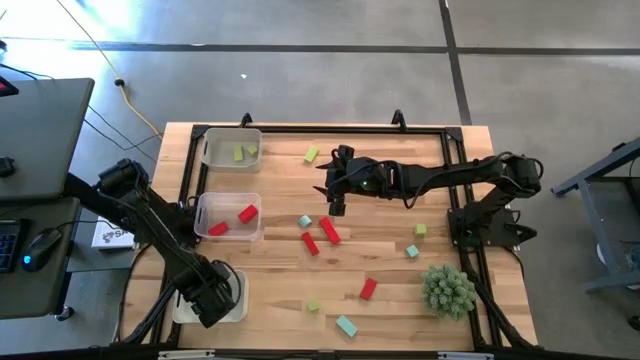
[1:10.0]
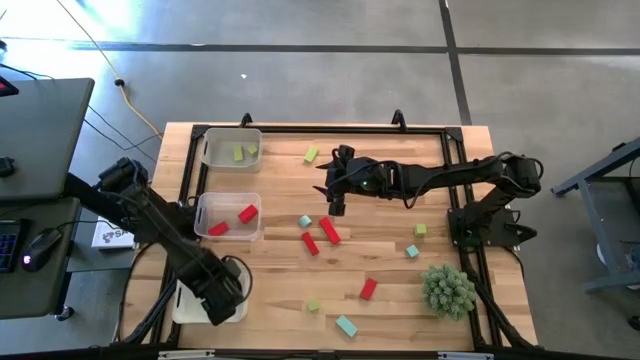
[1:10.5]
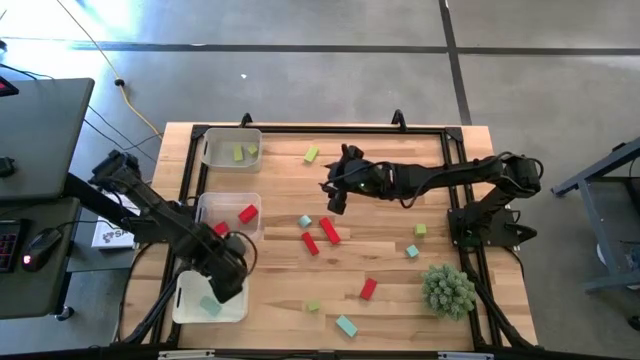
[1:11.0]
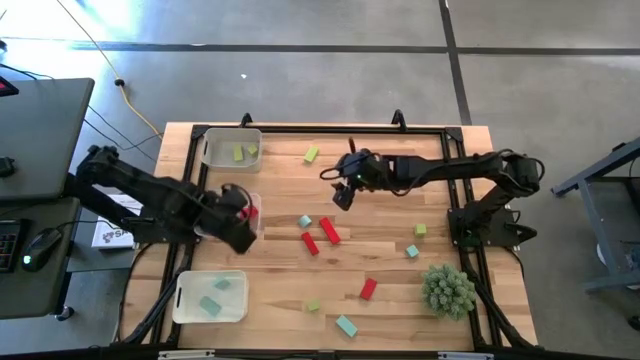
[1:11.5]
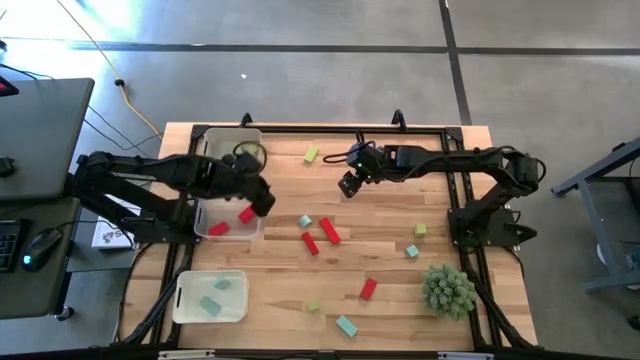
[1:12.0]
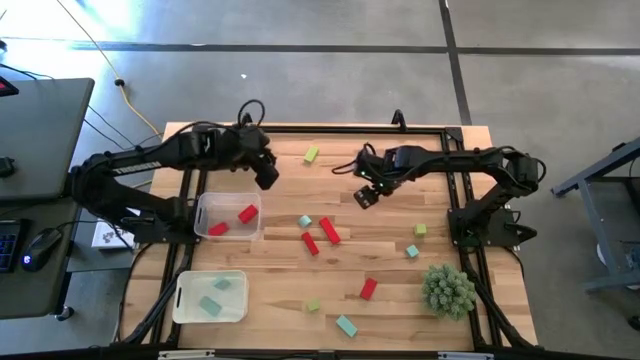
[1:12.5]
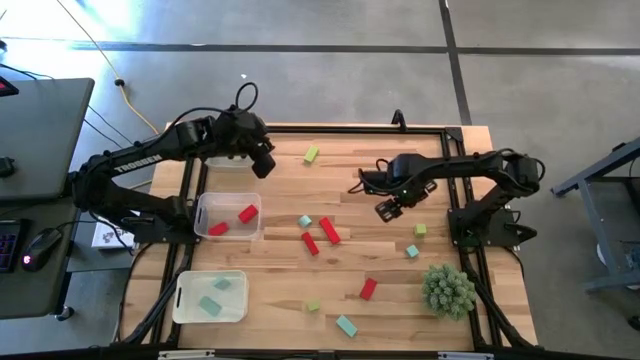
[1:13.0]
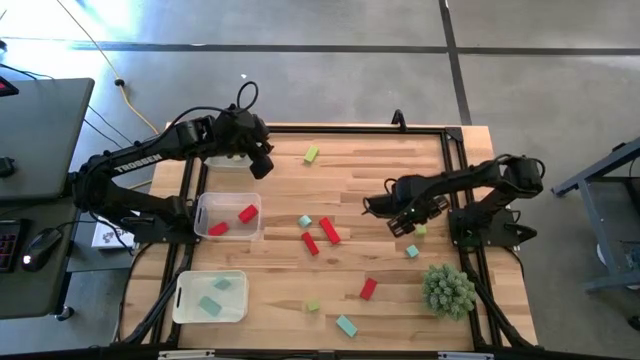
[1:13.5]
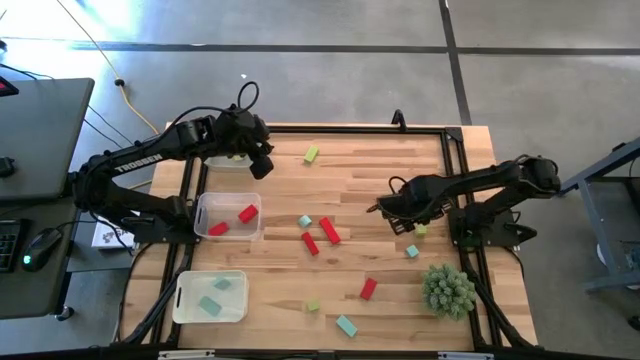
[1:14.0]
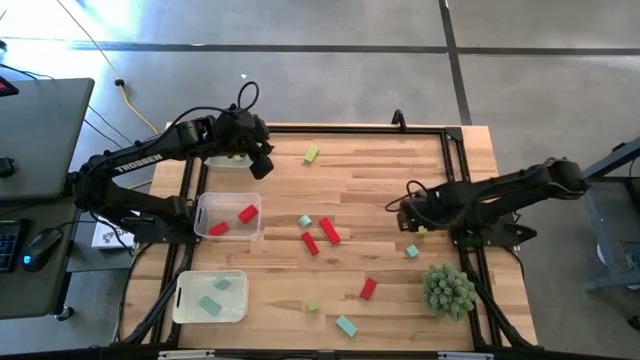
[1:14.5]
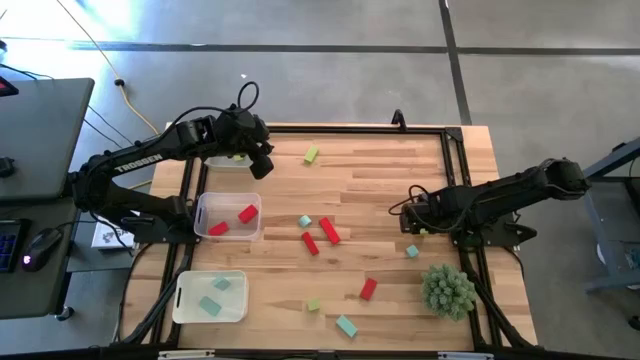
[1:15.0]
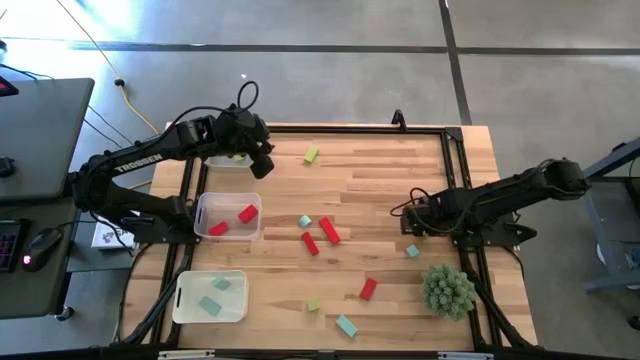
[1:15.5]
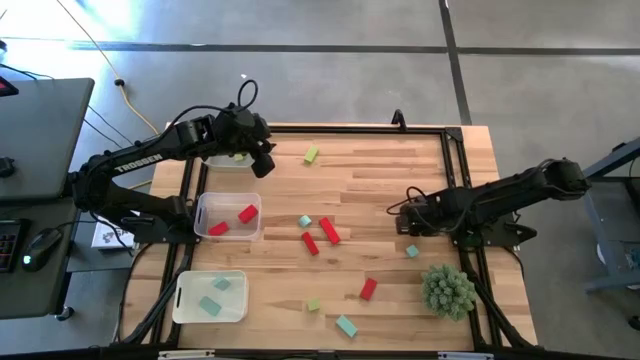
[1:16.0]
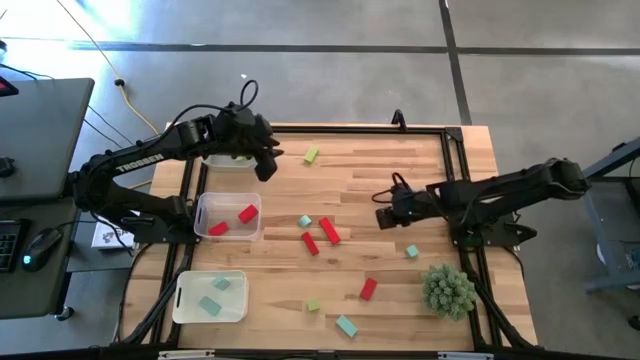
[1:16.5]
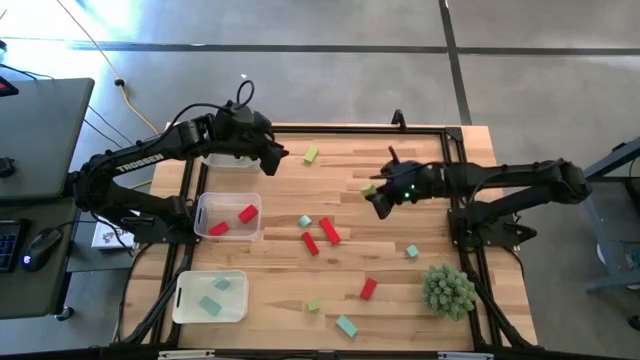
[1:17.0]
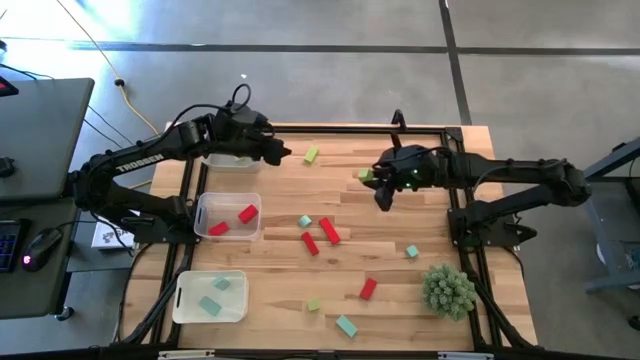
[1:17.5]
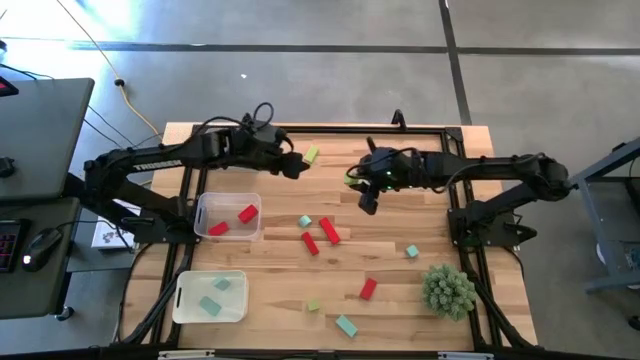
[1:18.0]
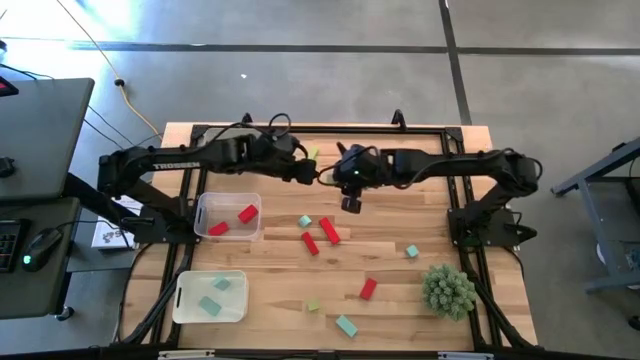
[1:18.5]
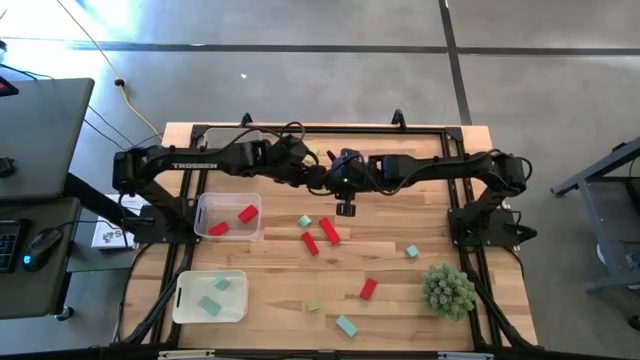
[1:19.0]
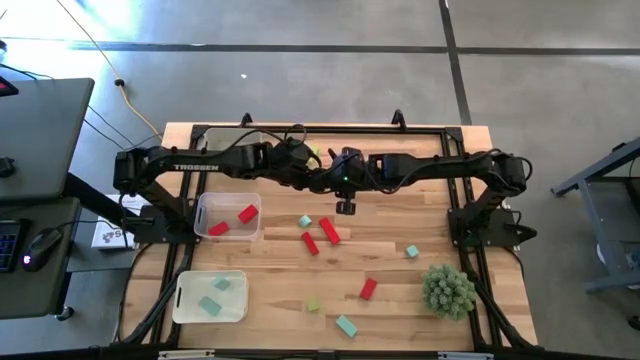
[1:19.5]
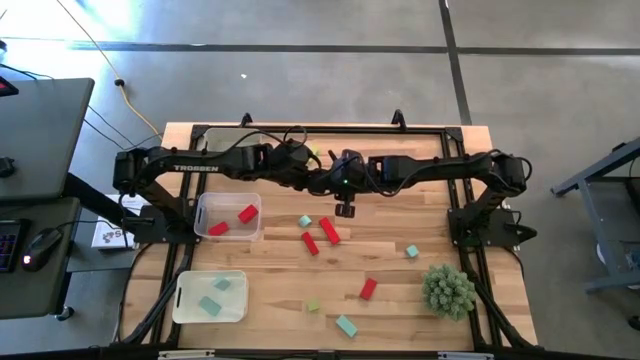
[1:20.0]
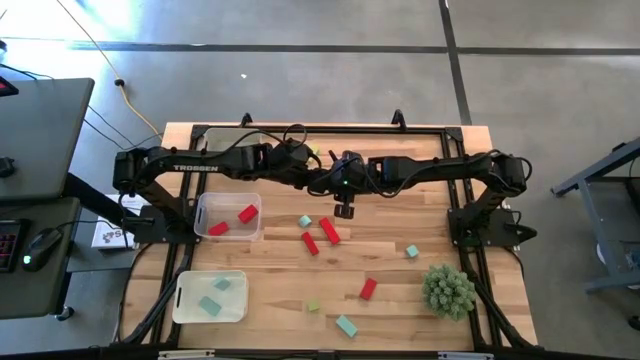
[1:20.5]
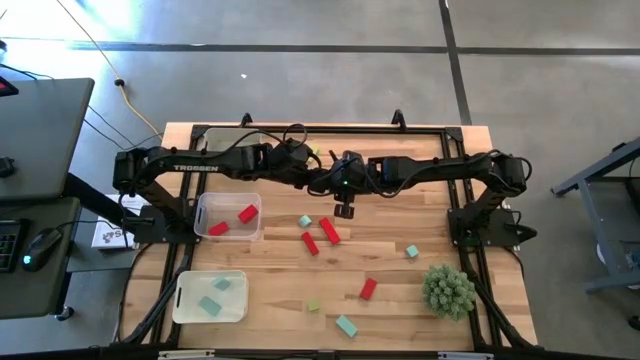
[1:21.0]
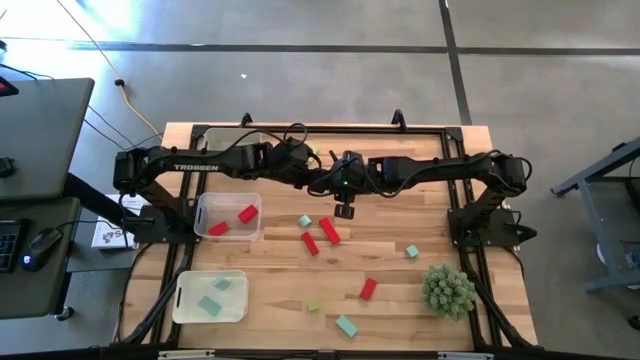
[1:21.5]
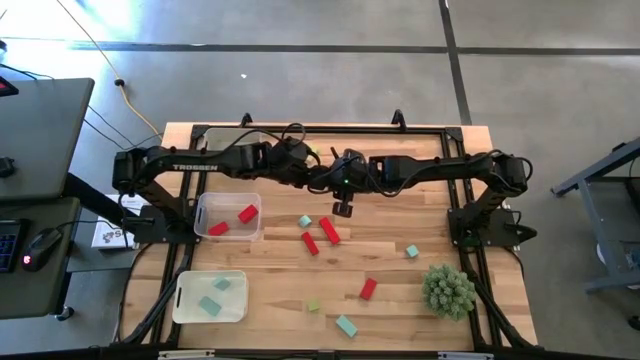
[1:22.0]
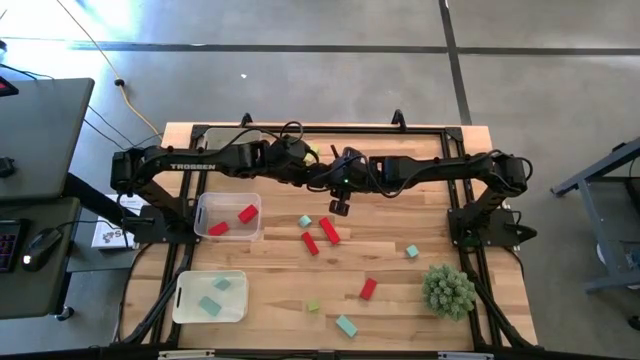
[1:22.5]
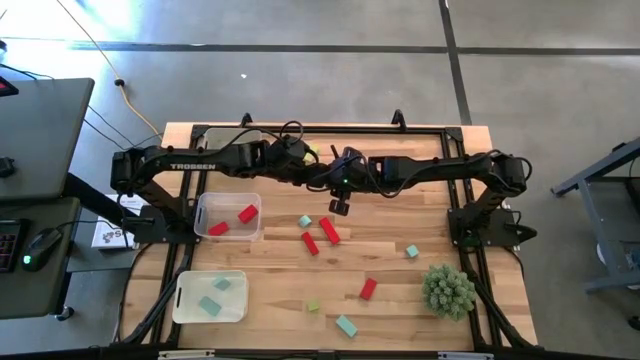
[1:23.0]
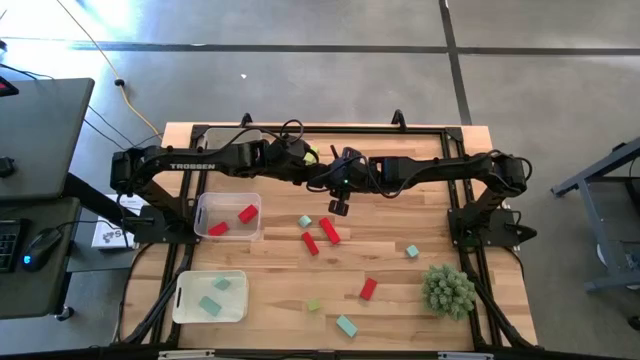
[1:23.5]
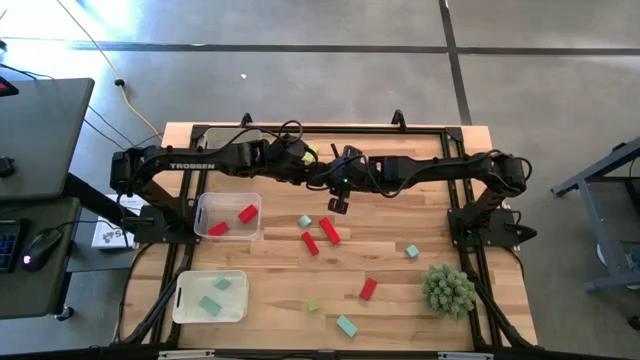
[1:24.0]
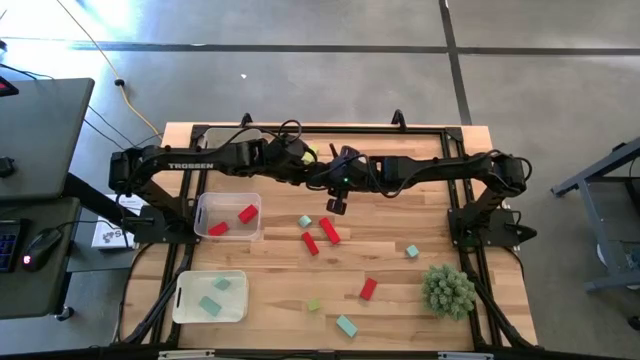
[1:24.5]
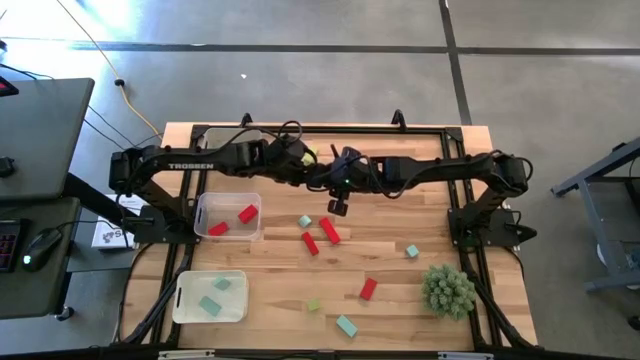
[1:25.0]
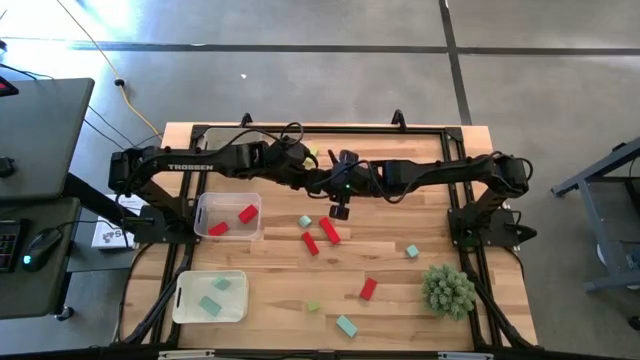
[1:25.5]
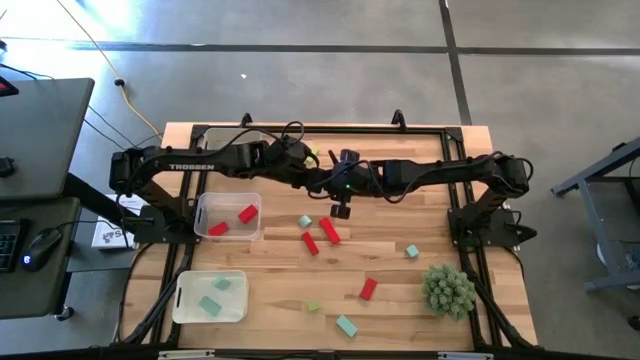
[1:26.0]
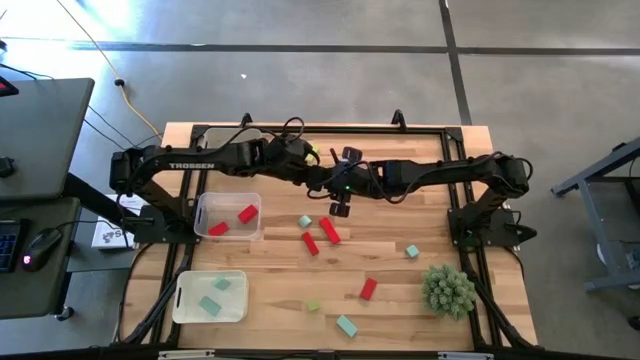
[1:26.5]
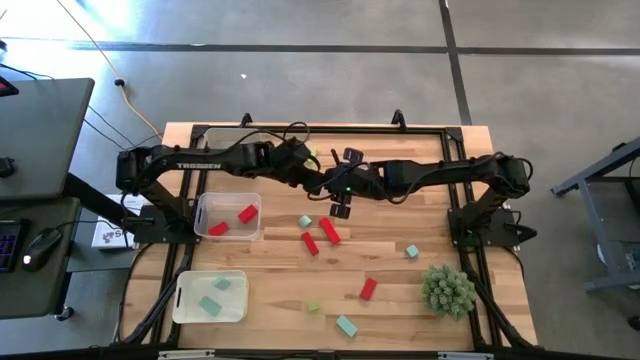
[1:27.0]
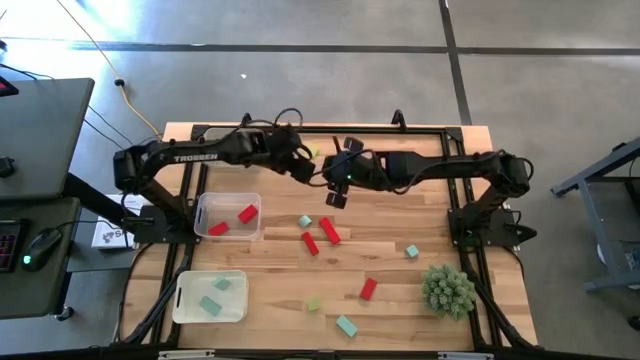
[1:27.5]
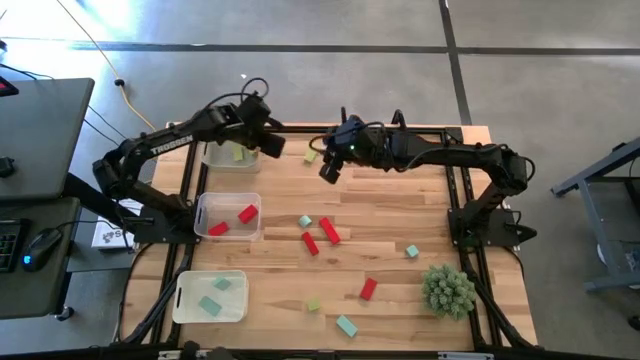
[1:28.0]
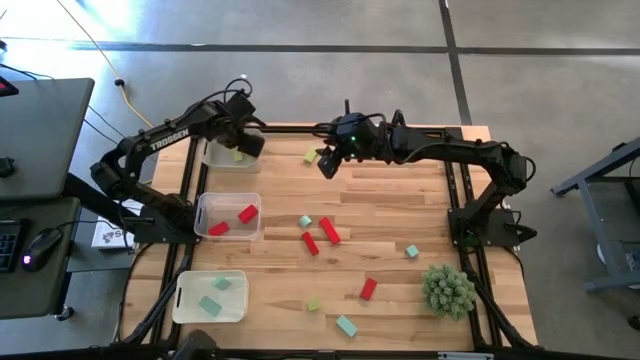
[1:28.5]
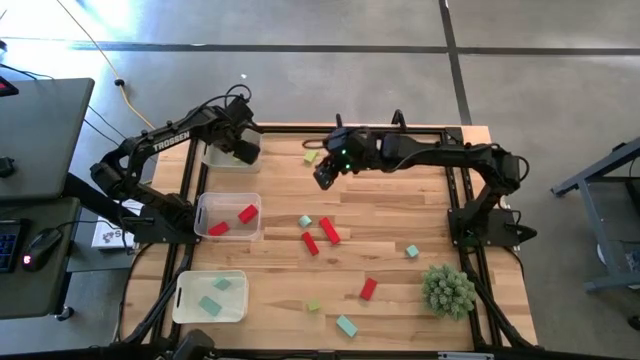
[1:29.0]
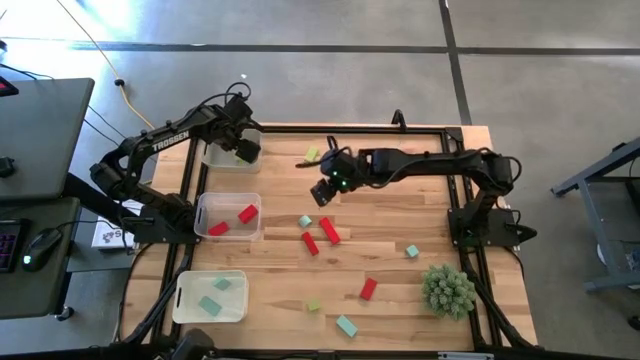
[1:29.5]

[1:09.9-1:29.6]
Task: Sort & place blocks by color
Put the light green block into the gray bin

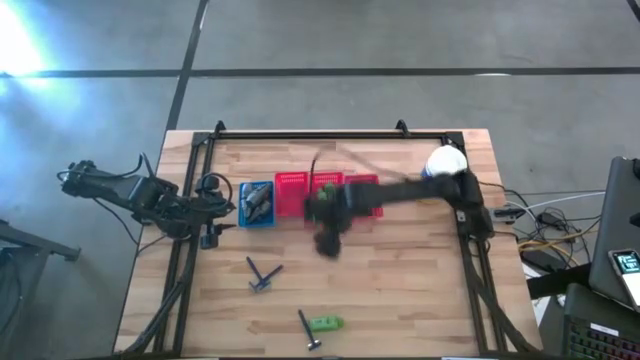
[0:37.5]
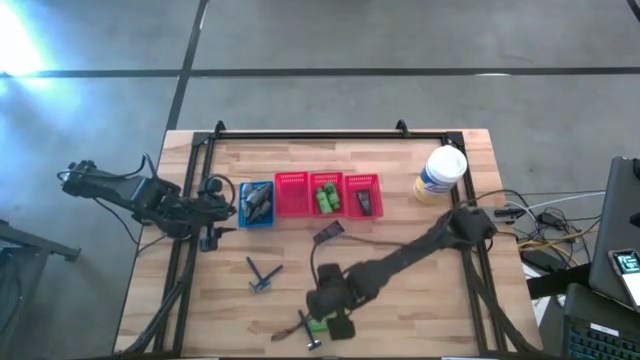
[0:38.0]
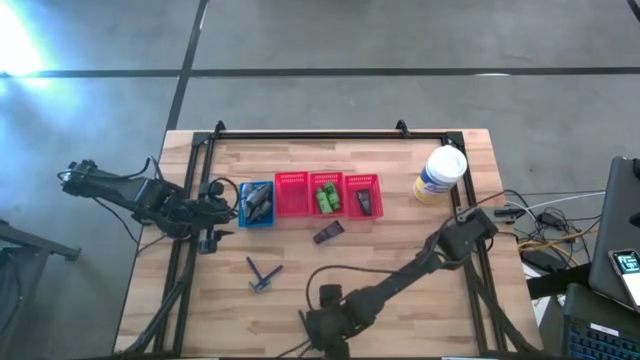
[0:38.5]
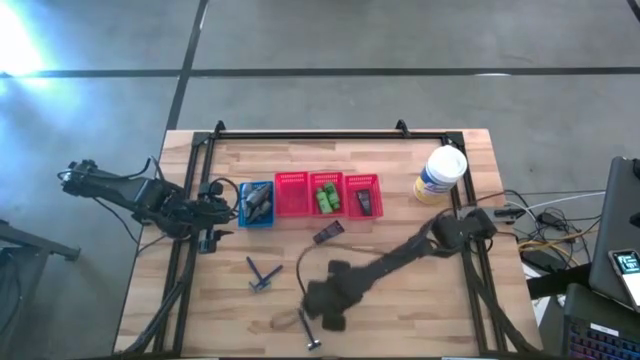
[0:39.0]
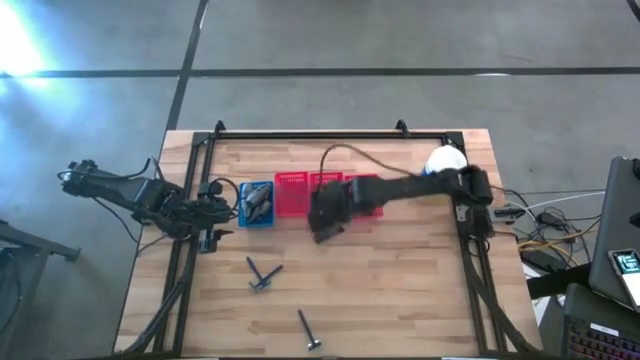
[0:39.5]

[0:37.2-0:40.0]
Task: Pick & Place Travel size toiletries
Put the green shampoo into the middle red bin
